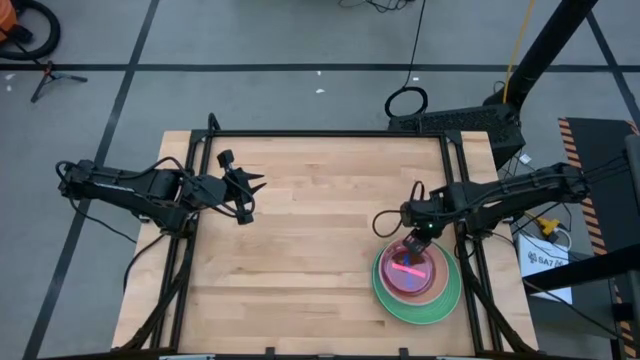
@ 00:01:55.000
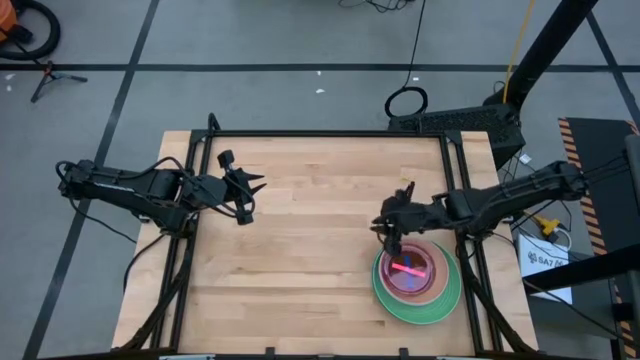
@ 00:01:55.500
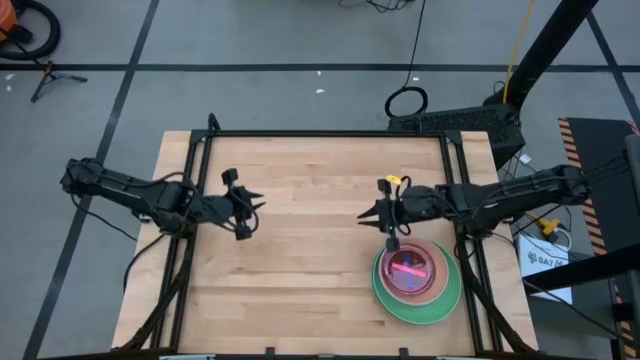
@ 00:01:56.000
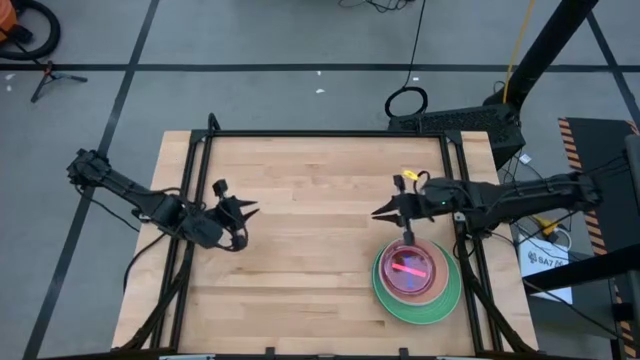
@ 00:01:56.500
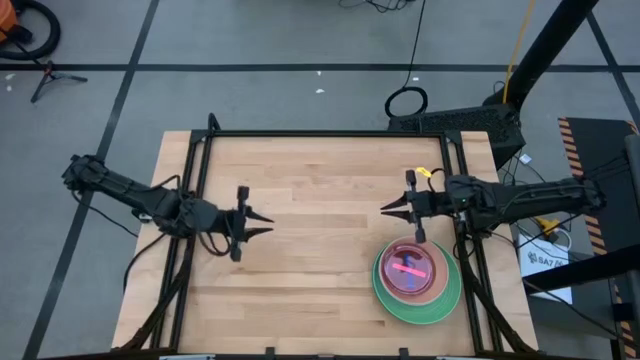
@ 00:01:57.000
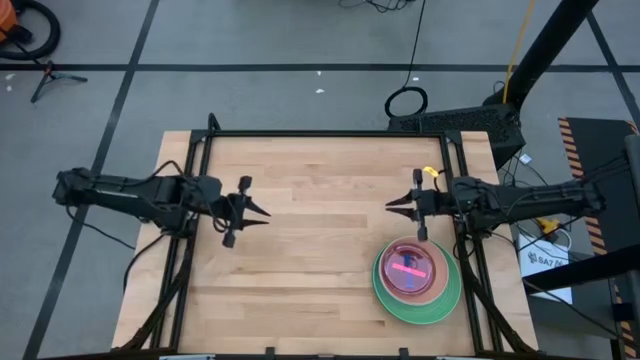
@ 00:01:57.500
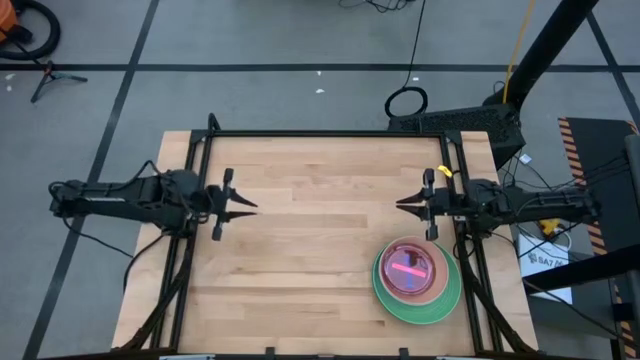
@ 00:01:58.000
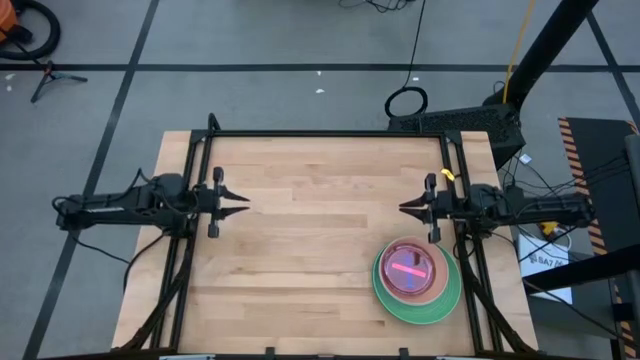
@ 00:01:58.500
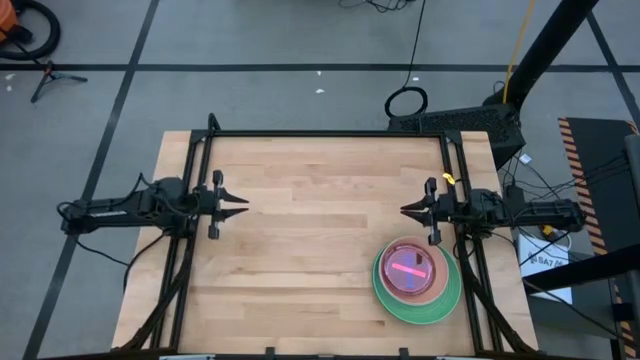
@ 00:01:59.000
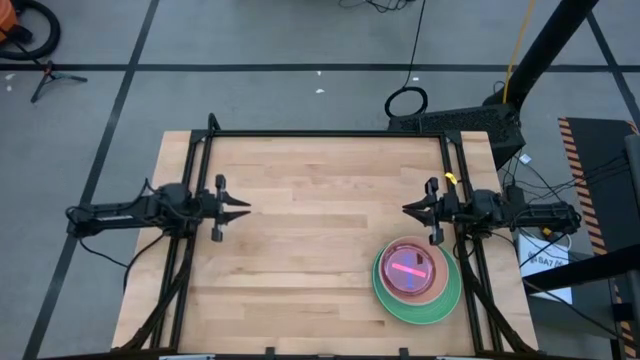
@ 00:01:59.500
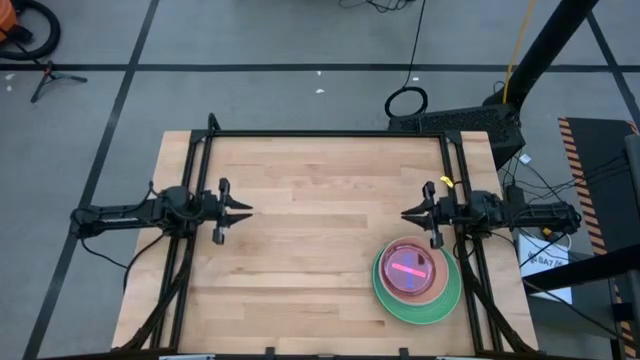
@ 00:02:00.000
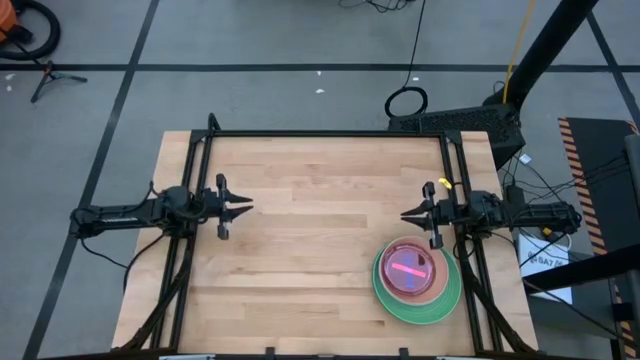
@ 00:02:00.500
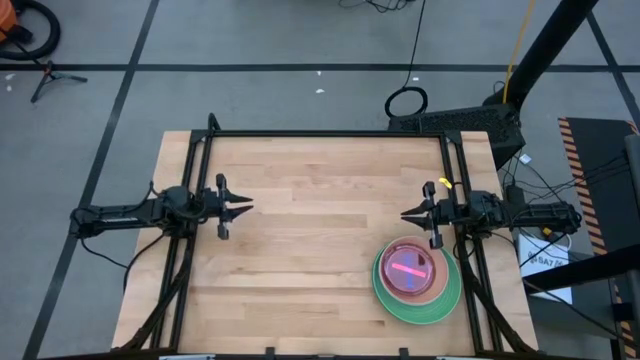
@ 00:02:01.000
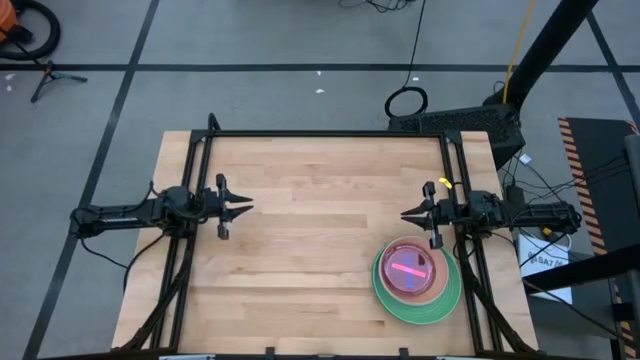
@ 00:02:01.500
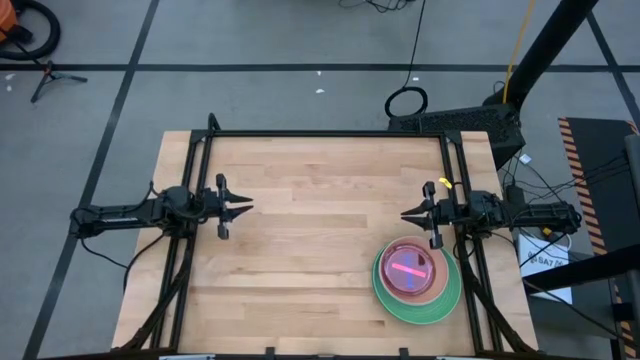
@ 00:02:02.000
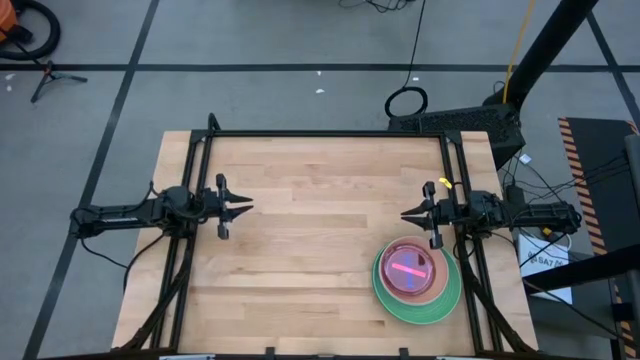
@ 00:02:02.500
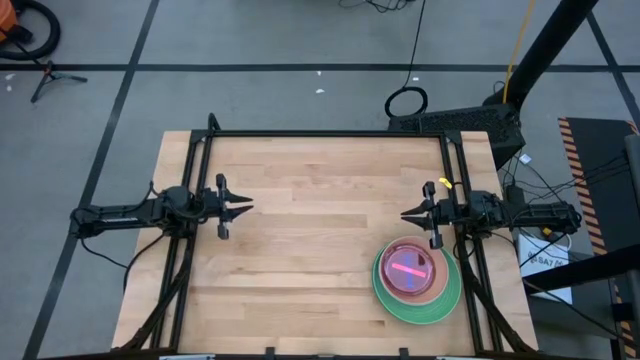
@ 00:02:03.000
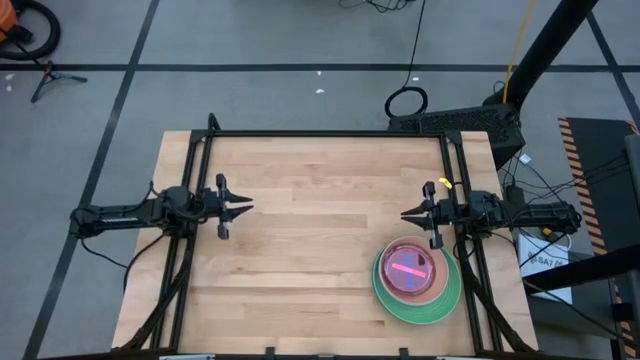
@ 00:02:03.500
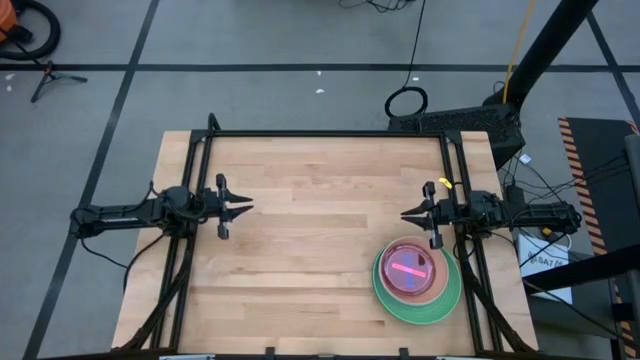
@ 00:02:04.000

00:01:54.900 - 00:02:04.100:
Task: Stack plastic plates
Return to home position

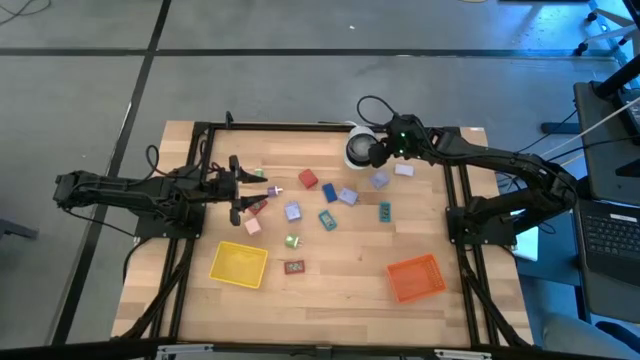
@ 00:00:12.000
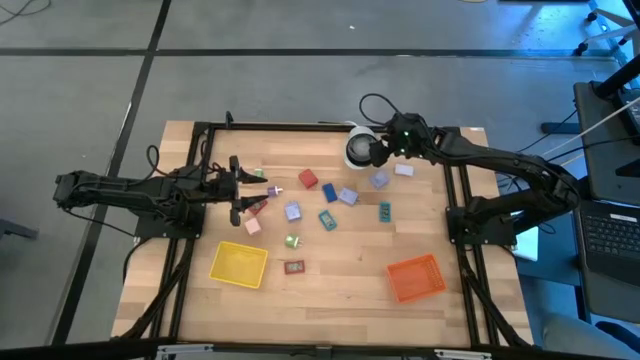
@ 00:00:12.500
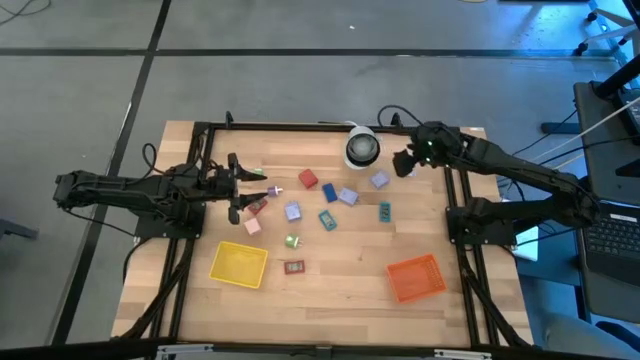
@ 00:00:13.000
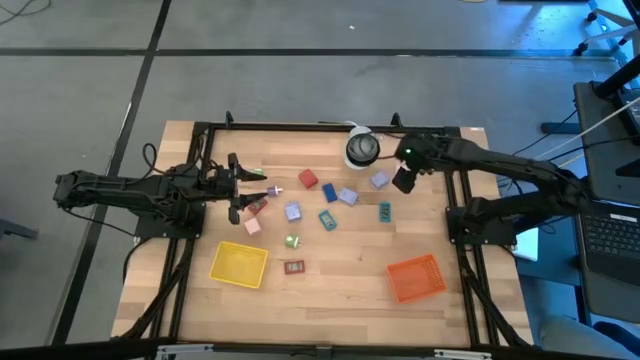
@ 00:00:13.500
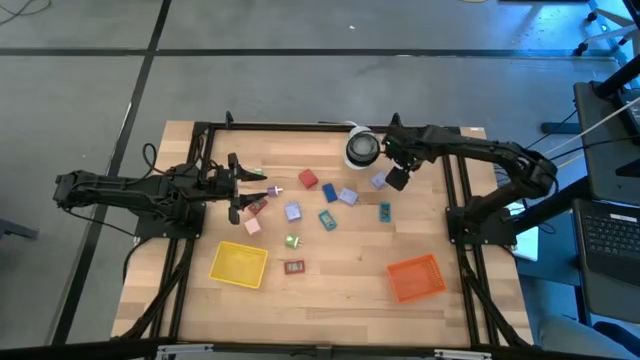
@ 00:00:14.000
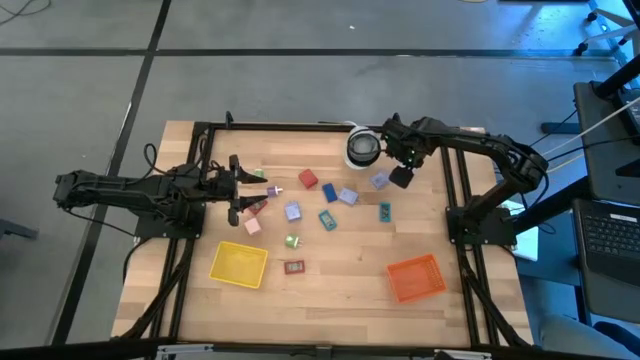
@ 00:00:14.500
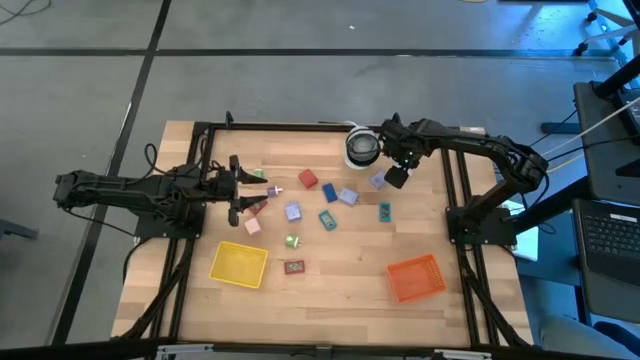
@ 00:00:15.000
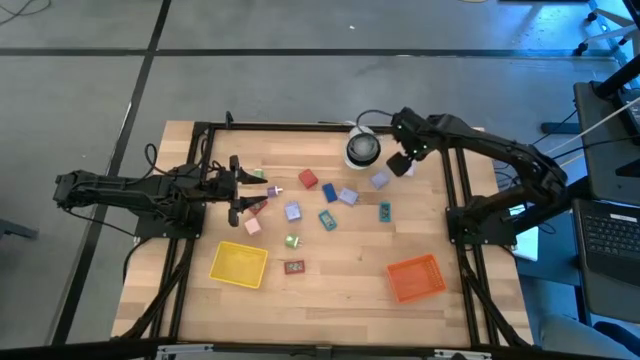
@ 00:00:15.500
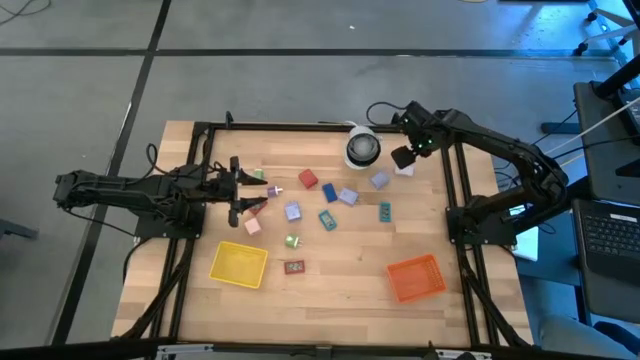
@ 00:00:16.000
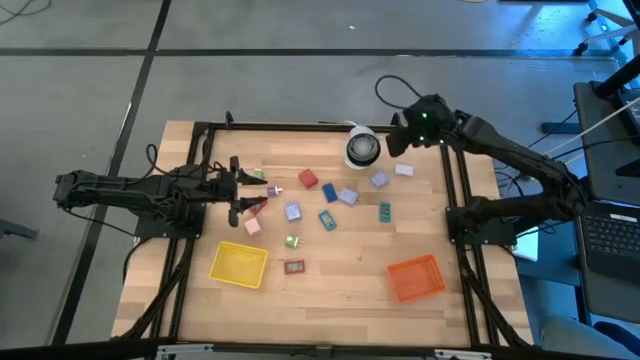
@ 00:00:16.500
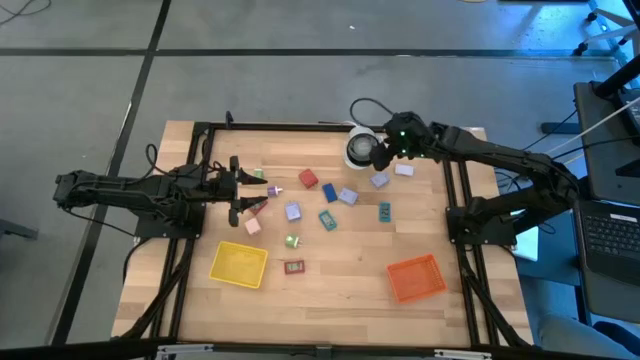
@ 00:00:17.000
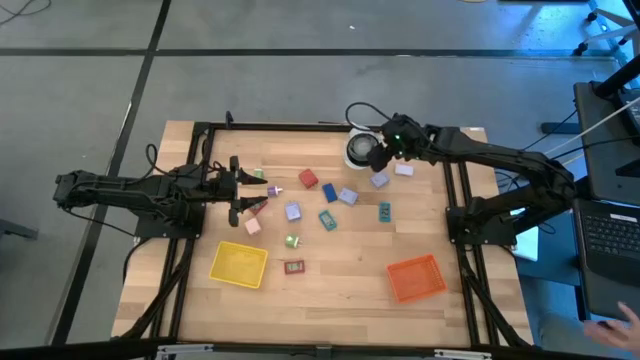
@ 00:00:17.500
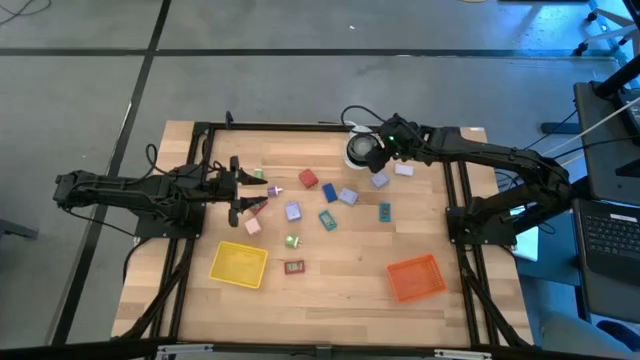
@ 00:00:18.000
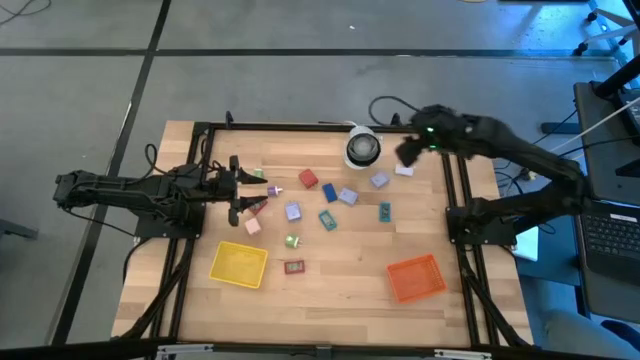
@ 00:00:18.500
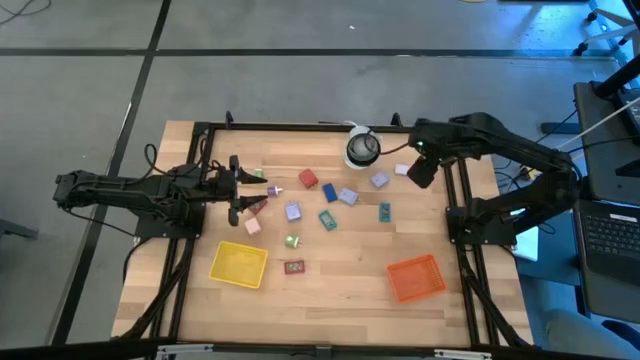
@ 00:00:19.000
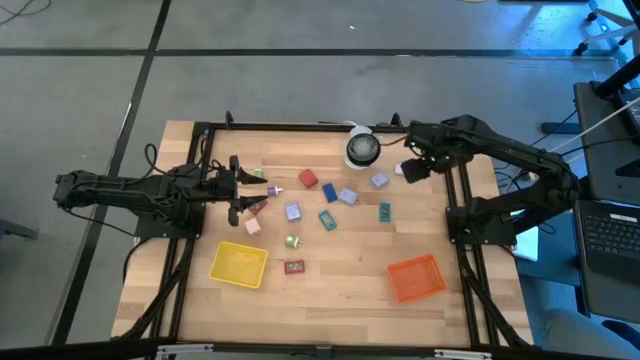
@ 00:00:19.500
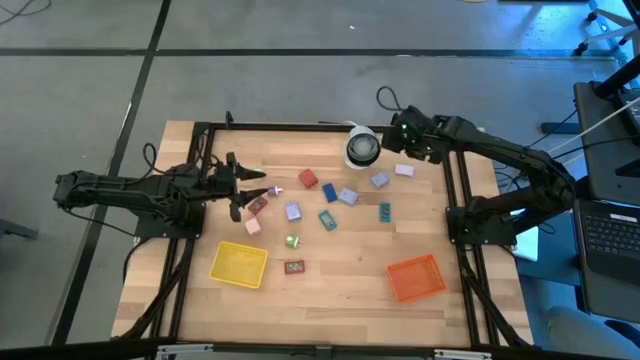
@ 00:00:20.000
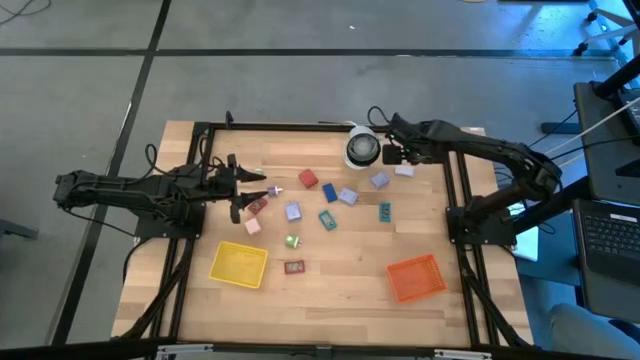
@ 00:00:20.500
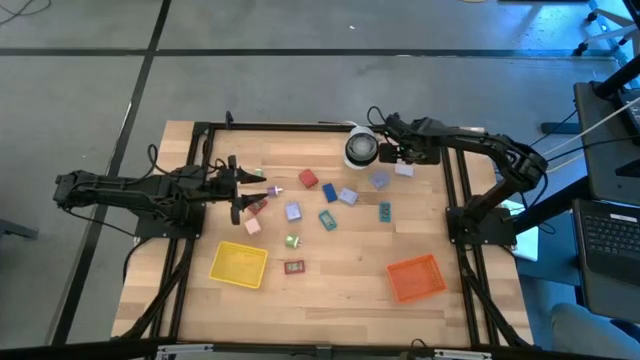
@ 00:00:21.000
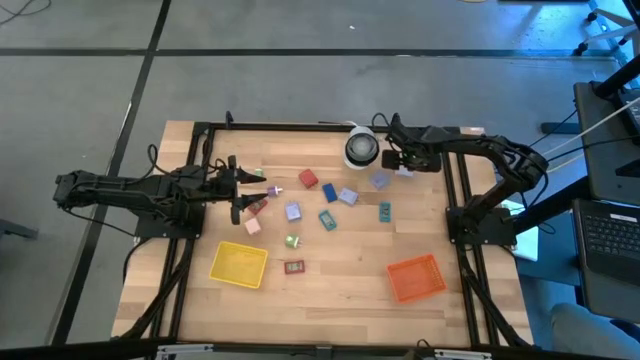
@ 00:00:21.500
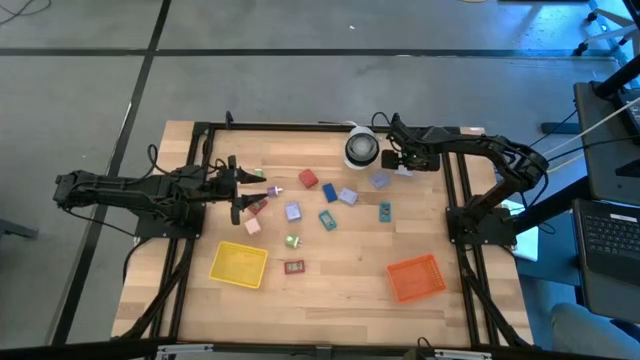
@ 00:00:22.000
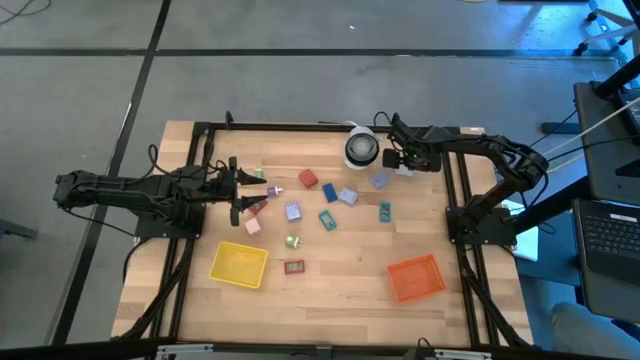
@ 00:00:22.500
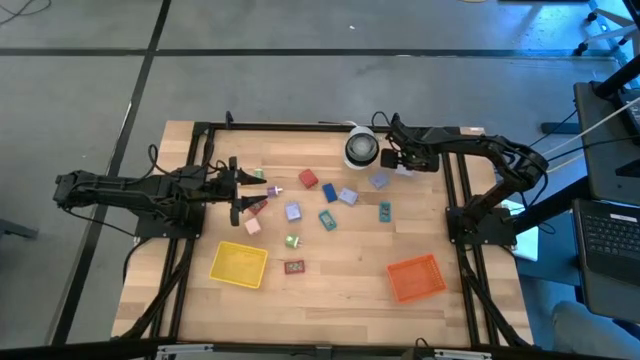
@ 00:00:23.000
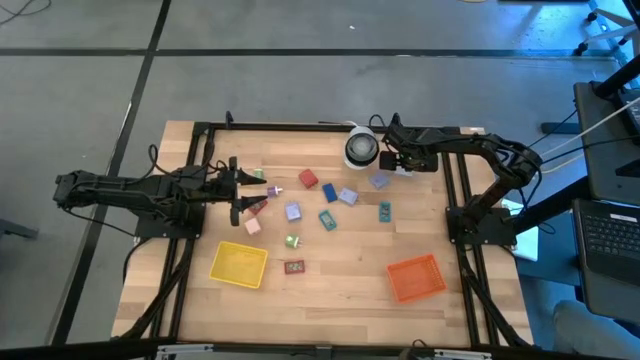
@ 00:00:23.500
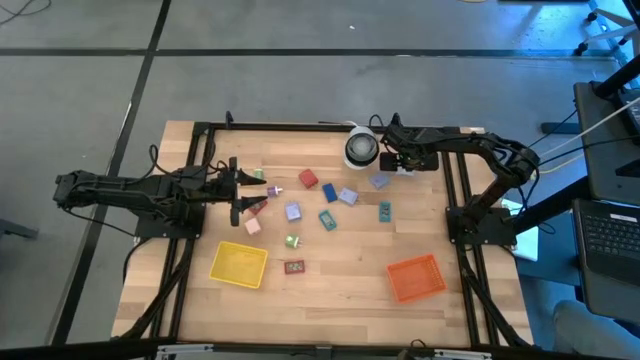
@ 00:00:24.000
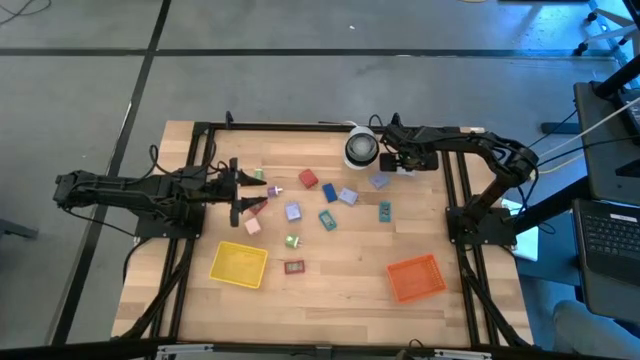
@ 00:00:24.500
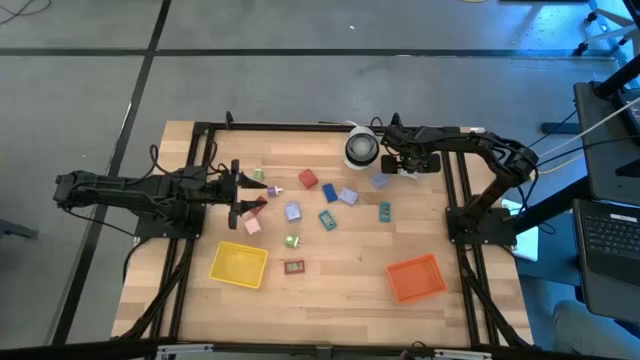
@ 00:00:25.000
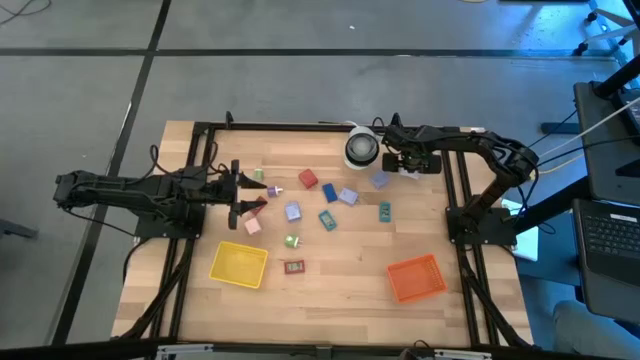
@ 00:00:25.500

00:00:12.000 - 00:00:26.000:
Task: Pick & Place Office items
Put the white digital timer into the yellow bin
